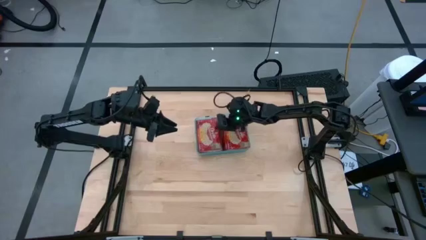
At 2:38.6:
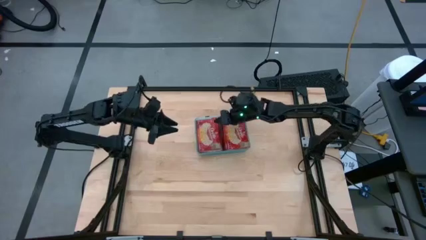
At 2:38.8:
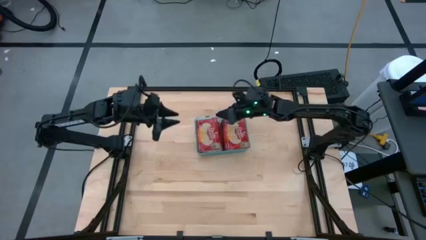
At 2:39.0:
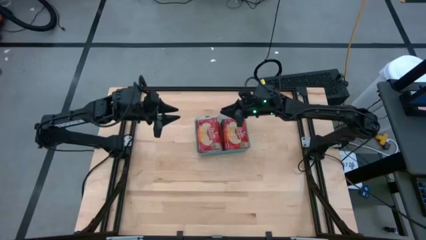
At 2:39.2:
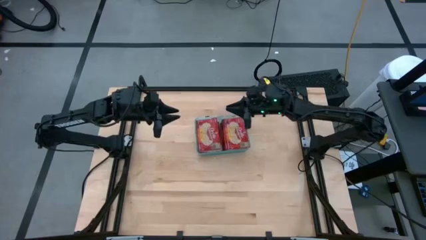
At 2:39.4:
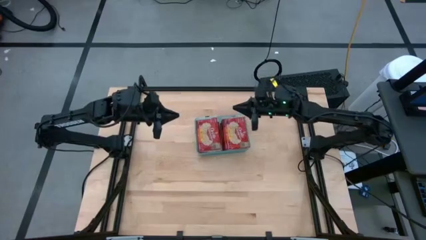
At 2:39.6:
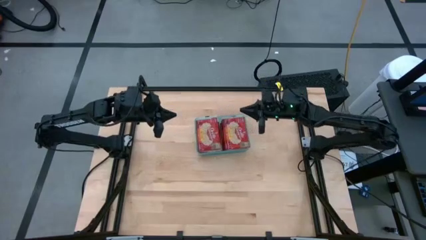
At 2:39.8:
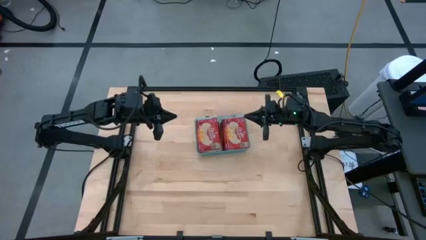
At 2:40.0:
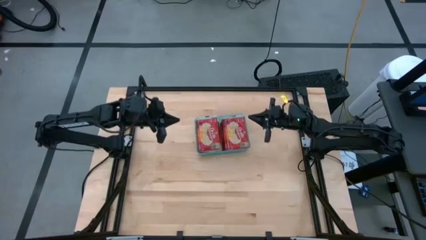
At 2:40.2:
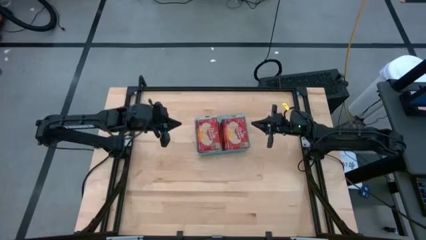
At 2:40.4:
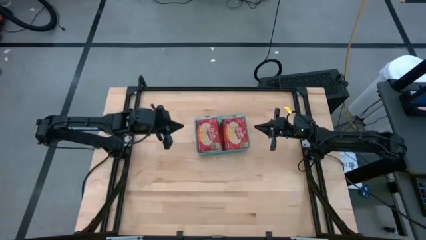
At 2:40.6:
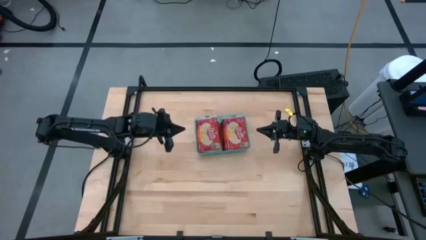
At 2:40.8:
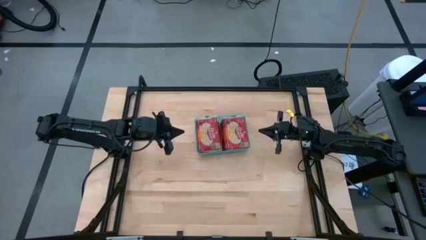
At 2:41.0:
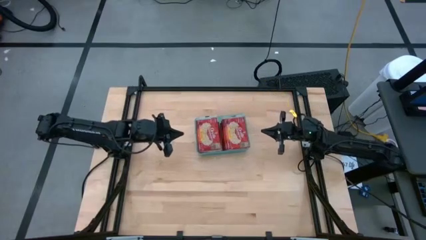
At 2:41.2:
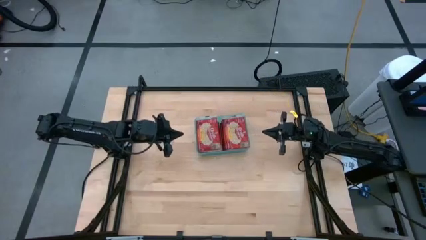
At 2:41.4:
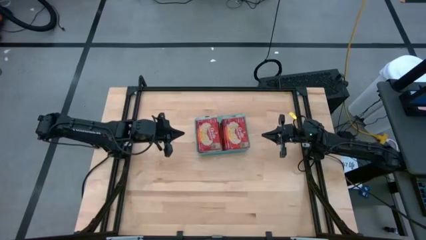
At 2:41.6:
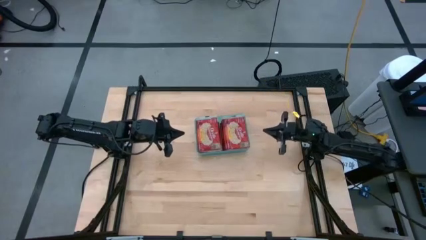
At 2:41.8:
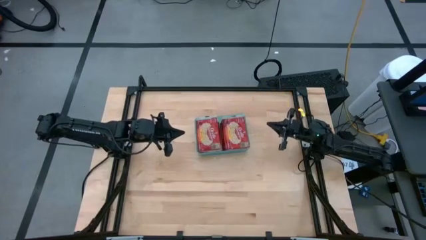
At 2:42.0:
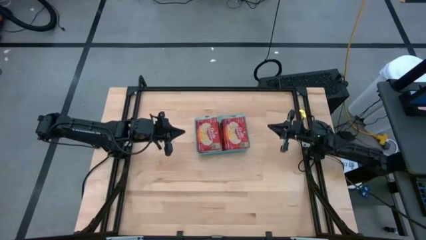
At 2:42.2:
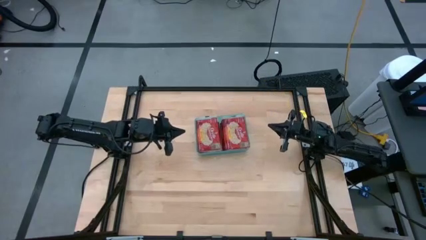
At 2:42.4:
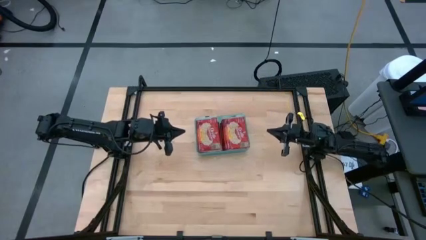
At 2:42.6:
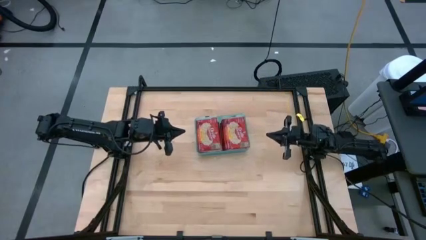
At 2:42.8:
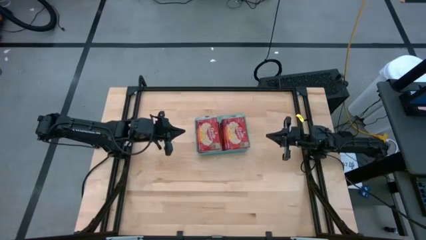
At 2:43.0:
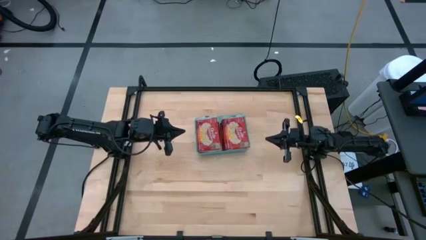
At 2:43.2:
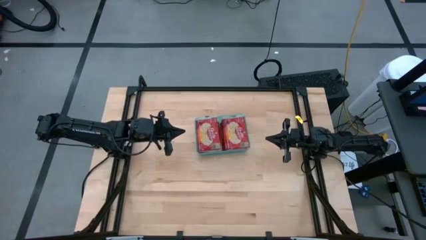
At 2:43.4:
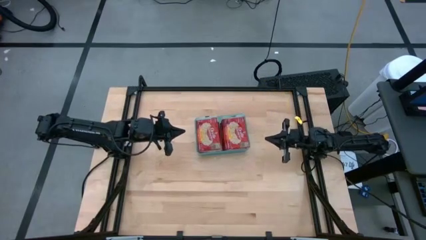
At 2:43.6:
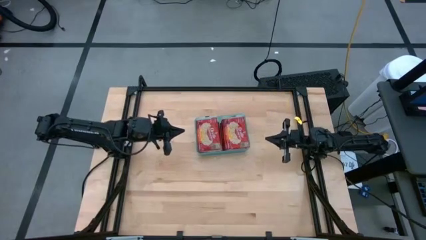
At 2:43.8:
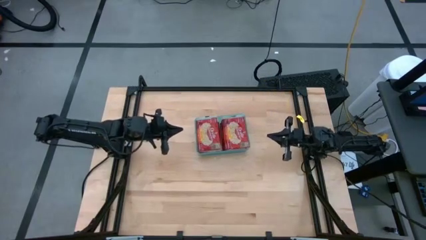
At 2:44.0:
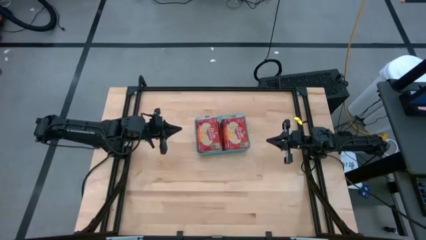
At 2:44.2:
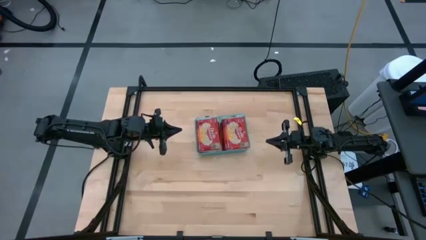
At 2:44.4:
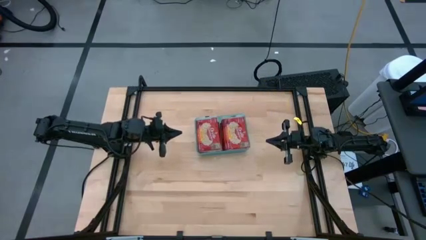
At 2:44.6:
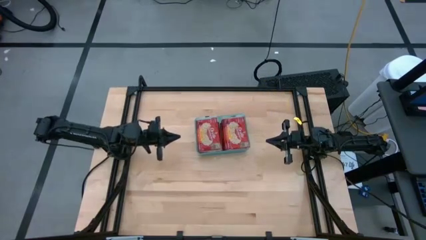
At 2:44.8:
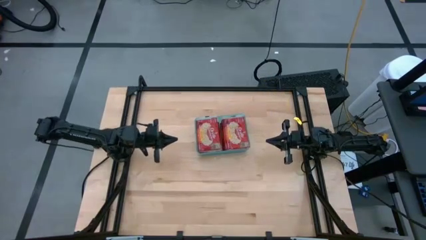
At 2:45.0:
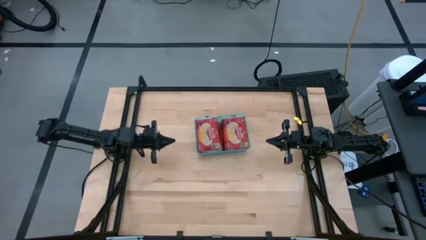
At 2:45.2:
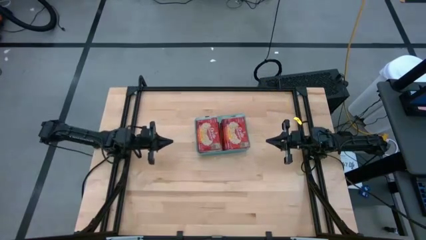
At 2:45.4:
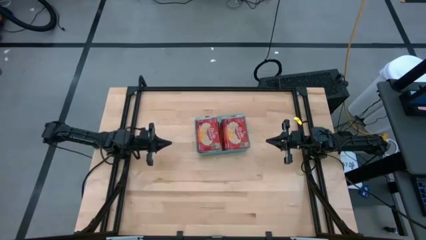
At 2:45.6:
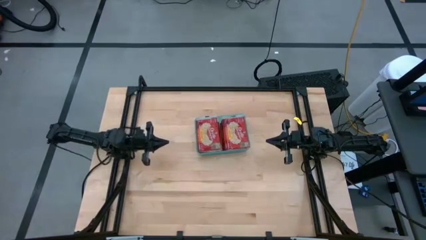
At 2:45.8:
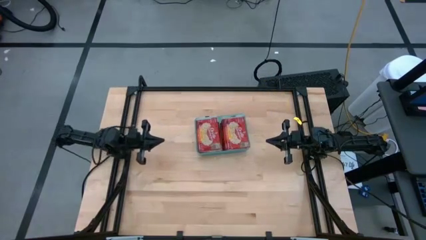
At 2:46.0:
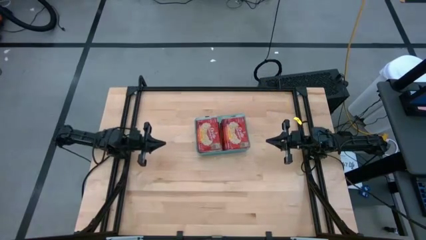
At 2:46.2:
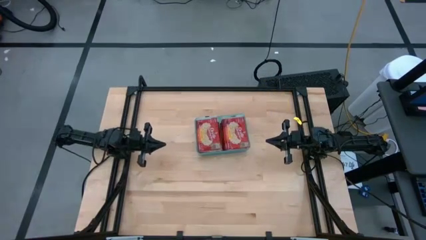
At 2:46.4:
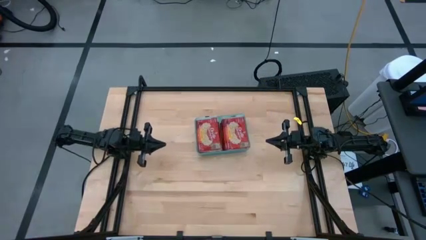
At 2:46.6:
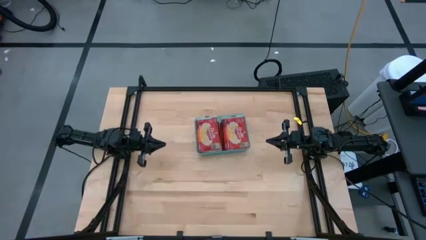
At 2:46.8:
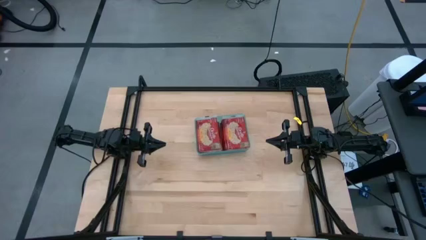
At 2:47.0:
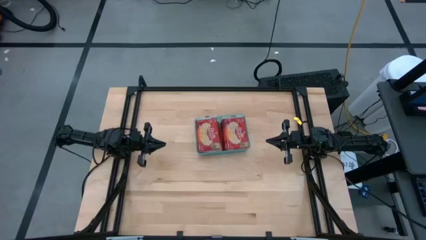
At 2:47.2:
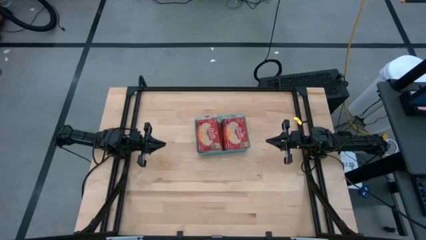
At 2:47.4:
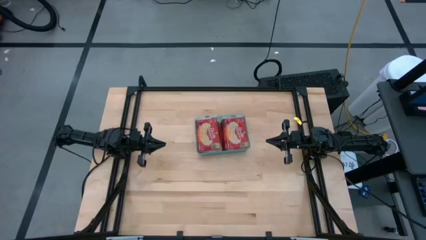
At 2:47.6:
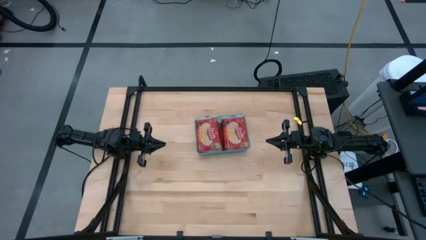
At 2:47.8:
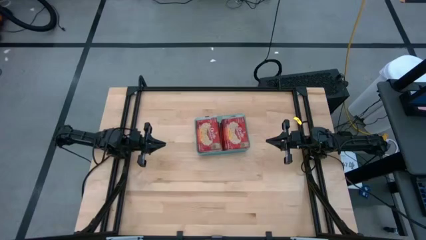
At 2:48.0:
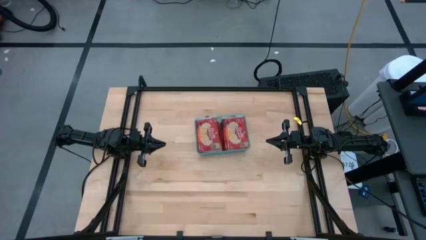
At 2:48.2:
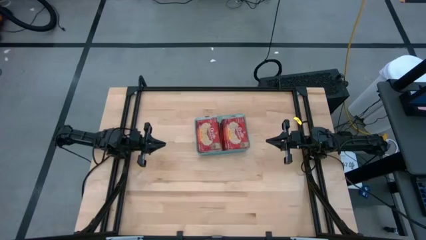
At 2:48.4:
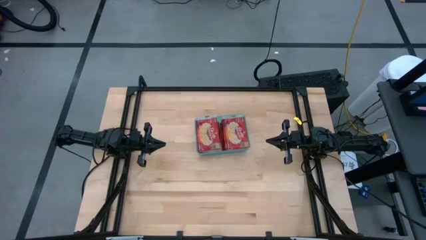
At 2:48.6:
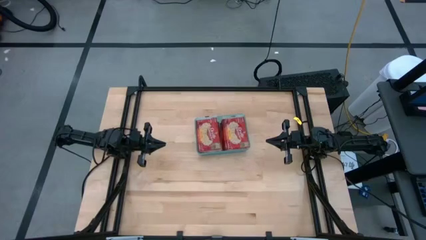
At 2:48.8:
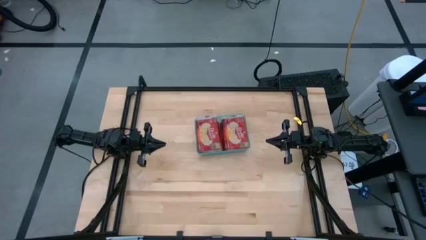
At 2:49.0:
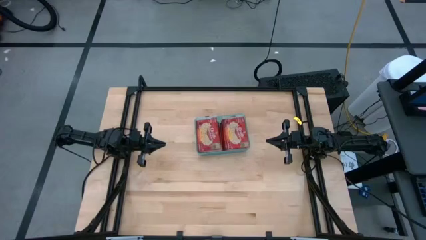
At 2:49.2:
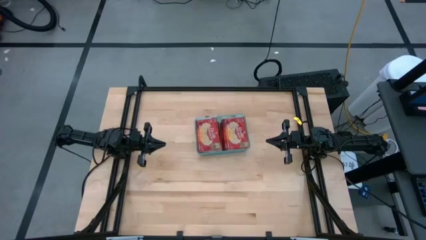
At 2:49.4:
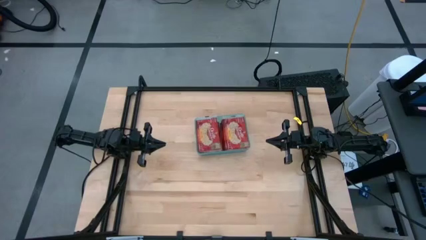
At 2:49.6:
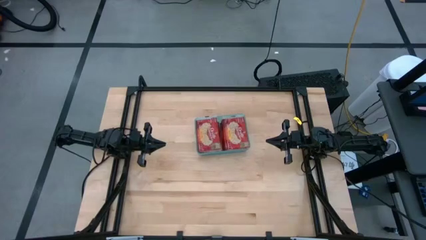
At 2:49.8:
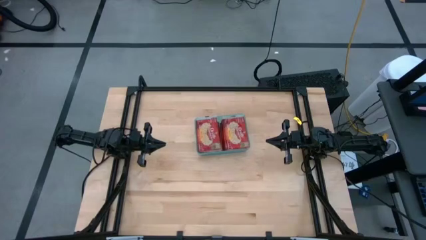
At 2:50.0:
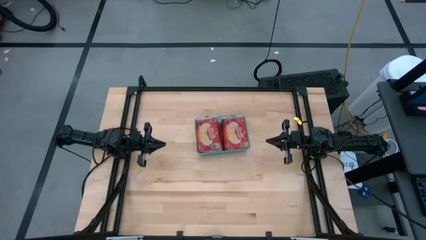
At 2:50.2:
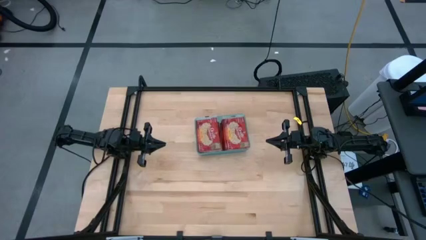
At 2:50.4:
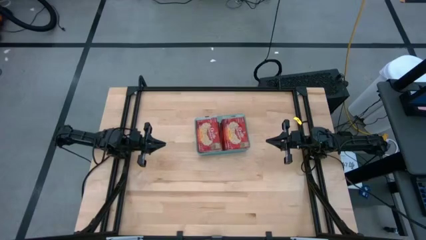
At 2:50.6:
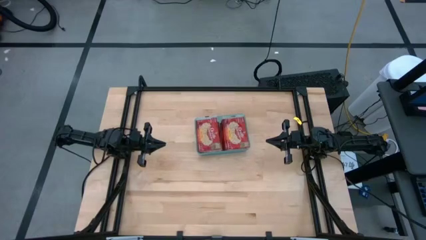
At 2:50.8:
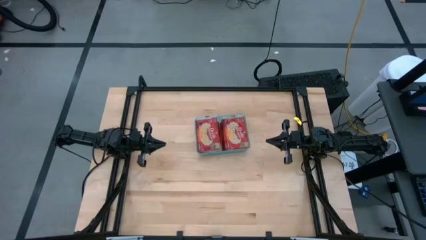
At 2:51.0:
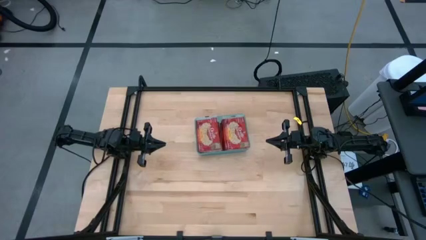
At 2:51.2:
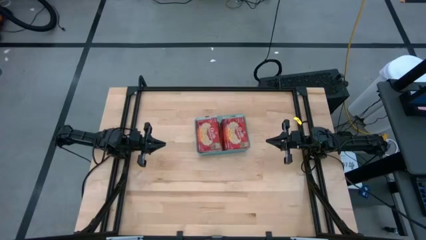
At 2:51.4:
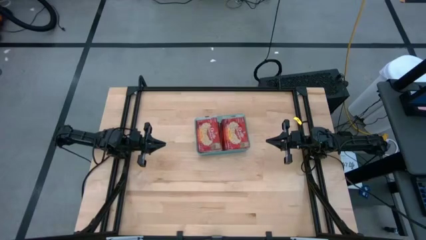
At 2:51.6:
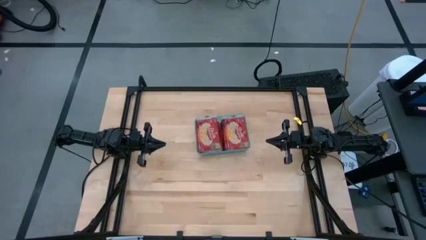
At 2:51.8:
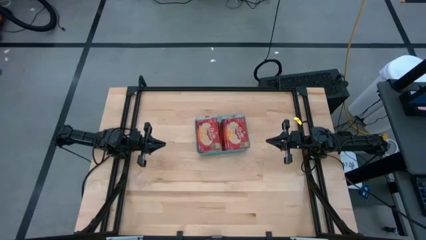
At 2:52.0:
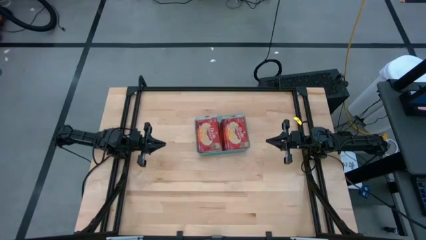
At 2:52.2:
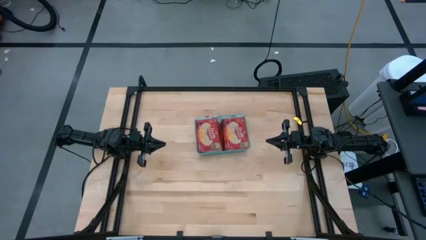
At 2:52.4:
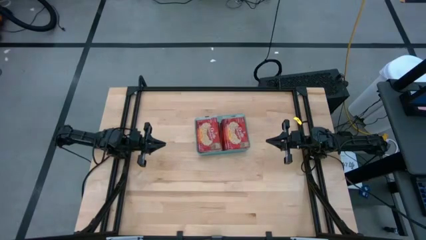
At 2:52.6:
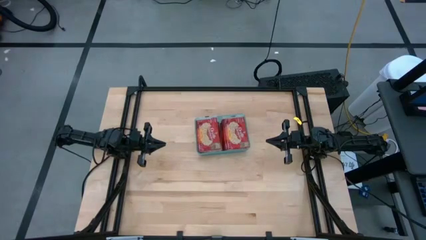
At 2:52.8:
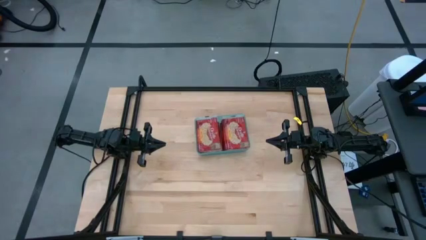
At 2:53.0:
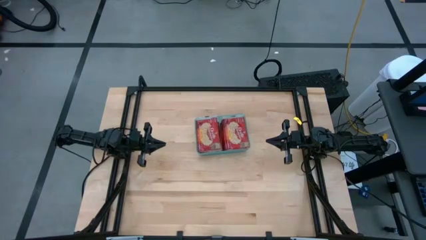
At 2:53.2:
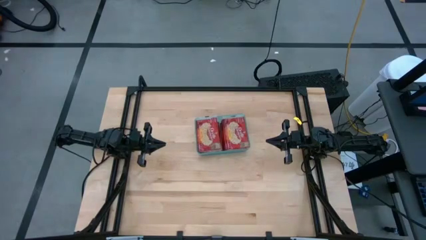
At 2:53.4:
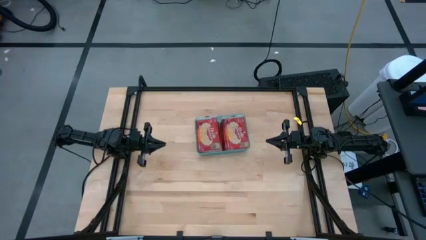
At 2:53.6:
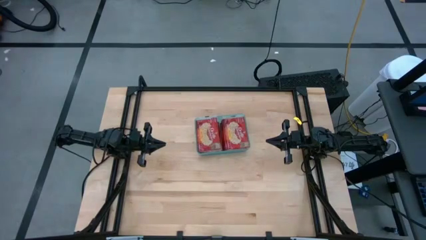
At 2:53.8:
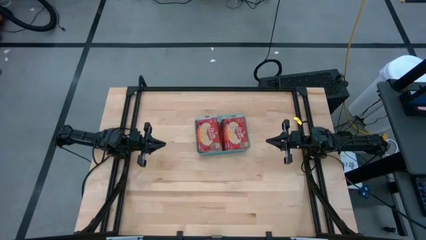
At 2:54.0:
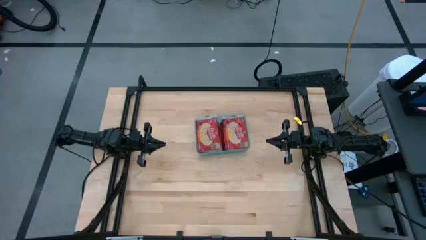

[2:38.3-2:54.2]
Task: Sort popcorn bags into baskets
Return to Home Position
